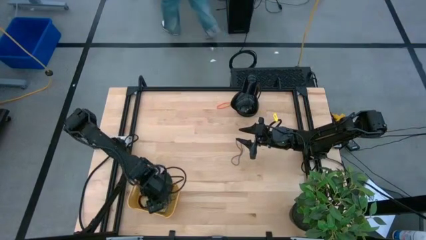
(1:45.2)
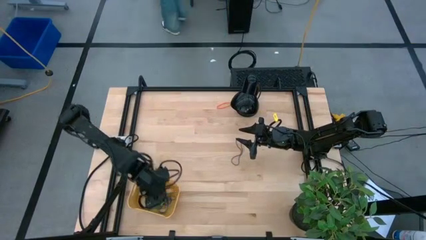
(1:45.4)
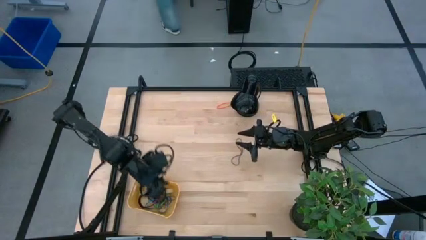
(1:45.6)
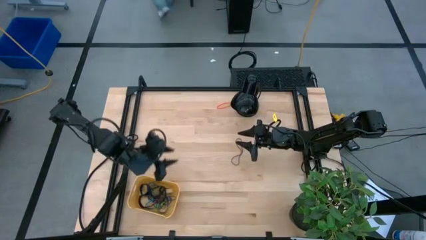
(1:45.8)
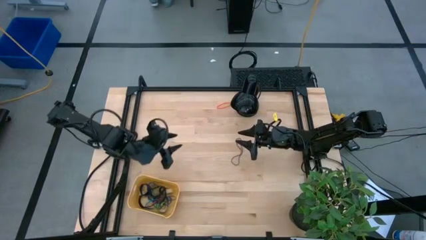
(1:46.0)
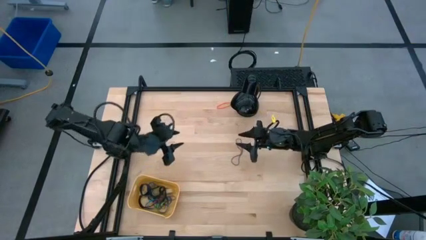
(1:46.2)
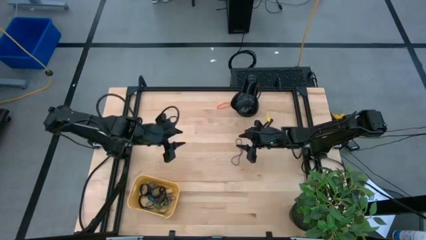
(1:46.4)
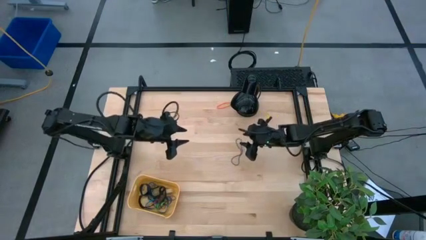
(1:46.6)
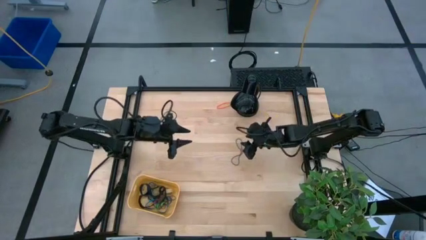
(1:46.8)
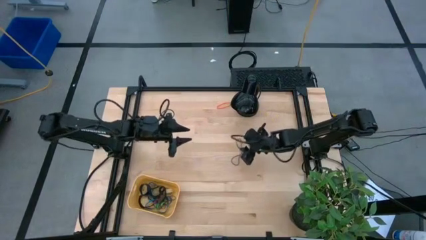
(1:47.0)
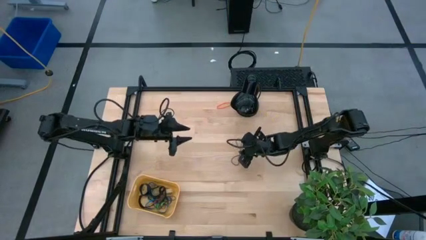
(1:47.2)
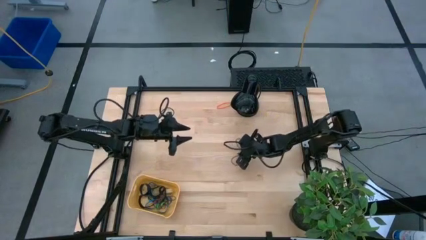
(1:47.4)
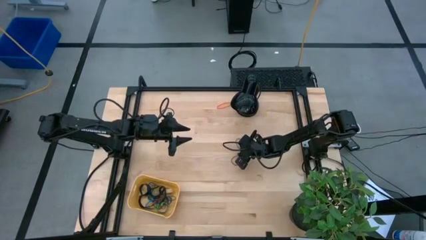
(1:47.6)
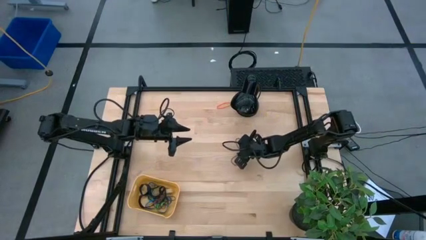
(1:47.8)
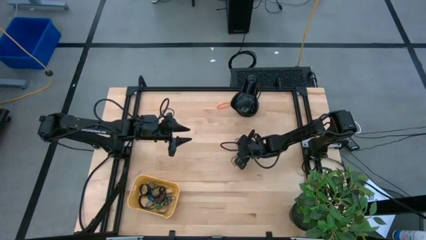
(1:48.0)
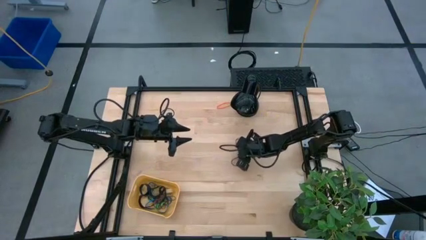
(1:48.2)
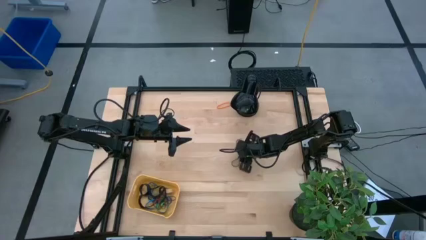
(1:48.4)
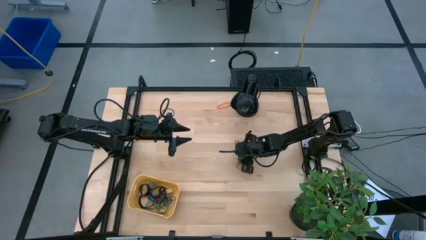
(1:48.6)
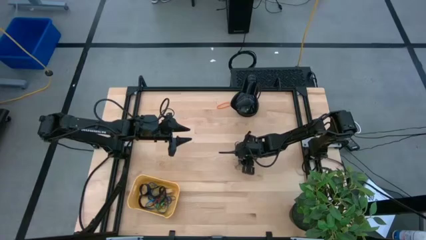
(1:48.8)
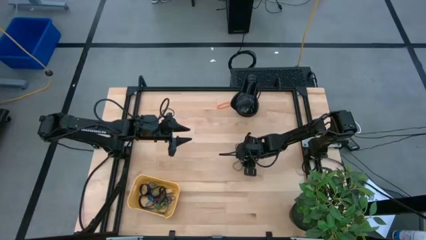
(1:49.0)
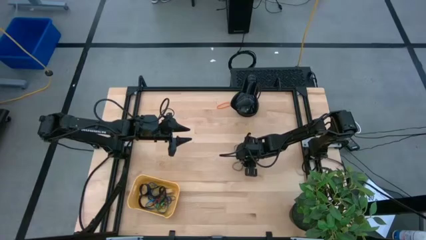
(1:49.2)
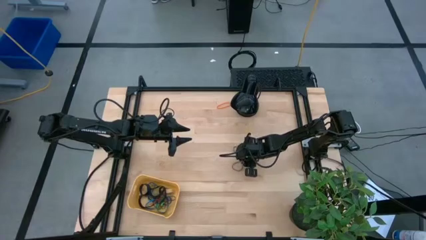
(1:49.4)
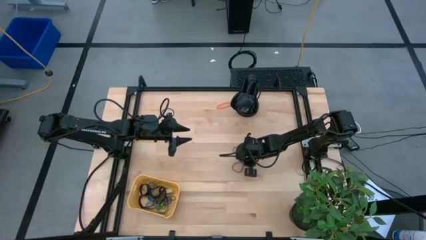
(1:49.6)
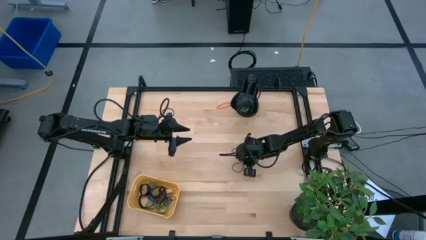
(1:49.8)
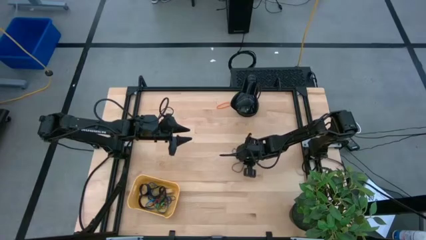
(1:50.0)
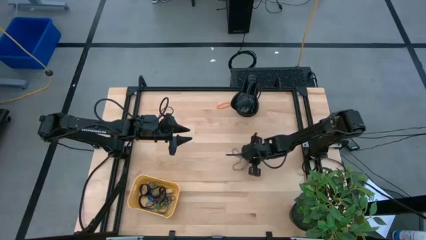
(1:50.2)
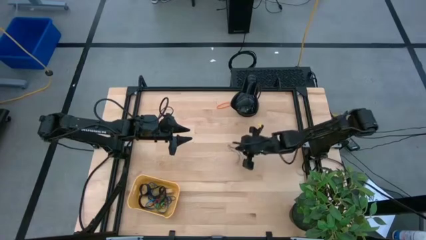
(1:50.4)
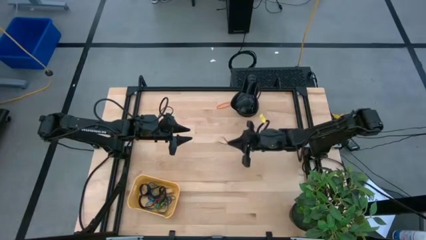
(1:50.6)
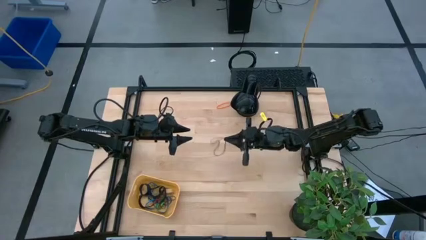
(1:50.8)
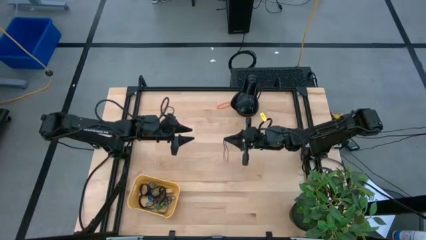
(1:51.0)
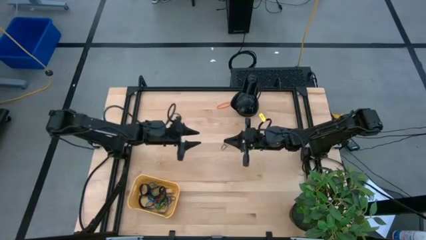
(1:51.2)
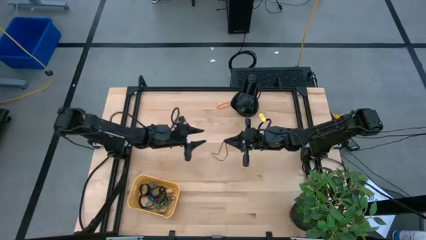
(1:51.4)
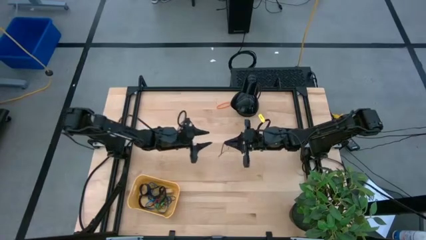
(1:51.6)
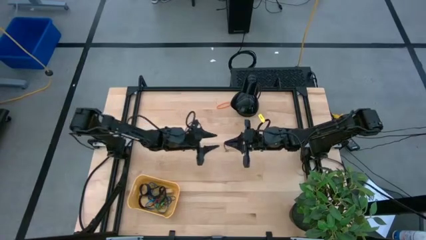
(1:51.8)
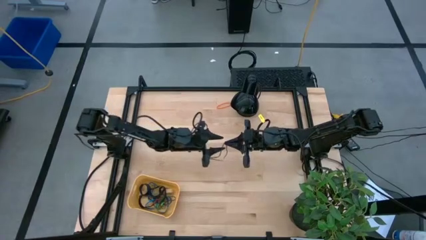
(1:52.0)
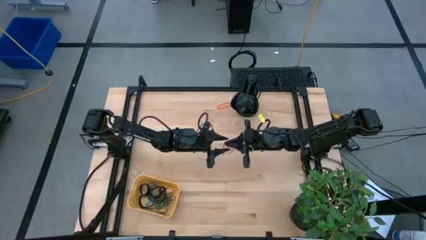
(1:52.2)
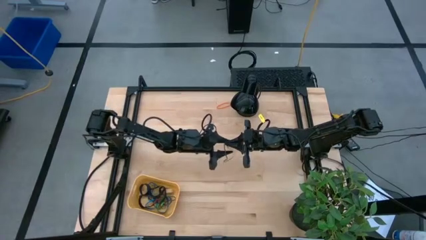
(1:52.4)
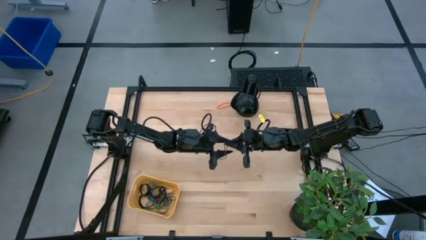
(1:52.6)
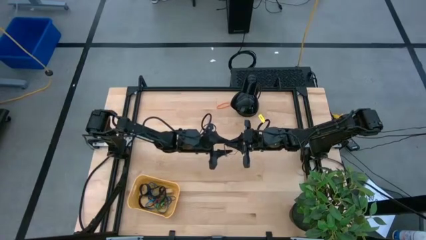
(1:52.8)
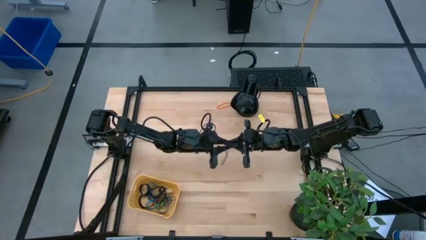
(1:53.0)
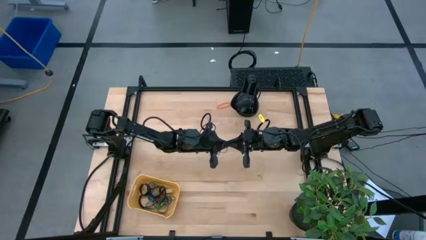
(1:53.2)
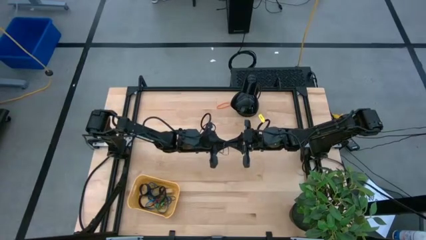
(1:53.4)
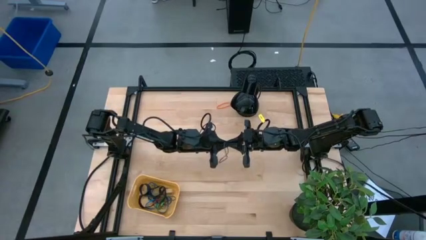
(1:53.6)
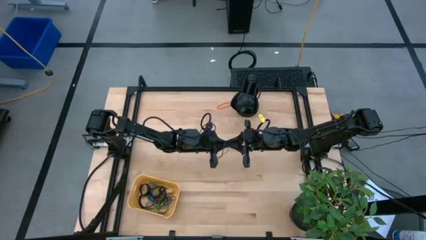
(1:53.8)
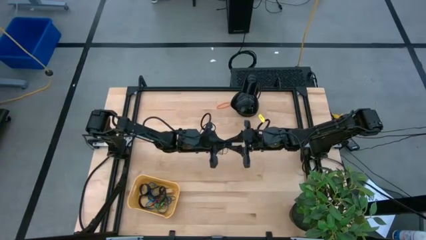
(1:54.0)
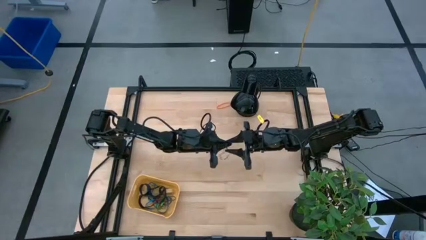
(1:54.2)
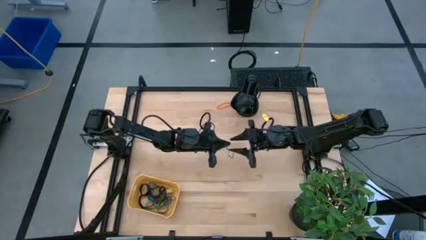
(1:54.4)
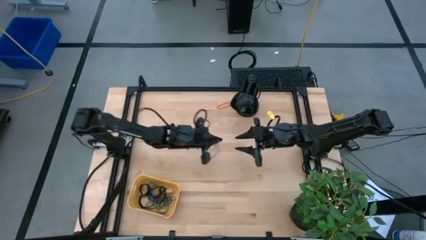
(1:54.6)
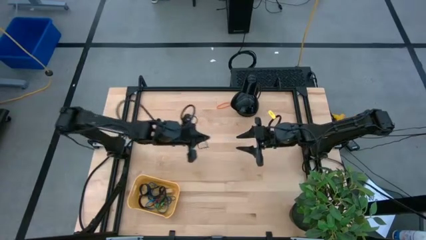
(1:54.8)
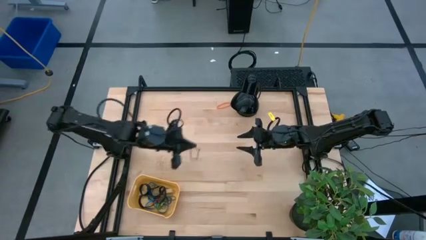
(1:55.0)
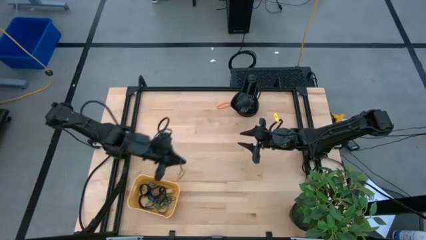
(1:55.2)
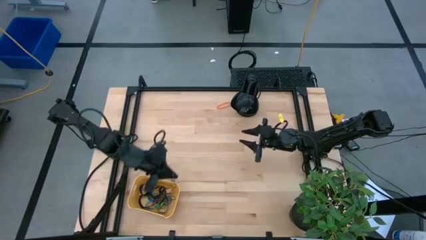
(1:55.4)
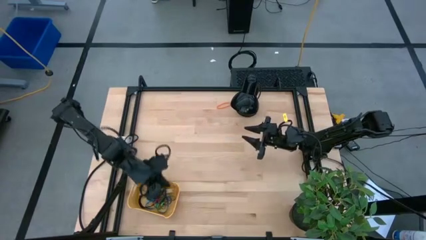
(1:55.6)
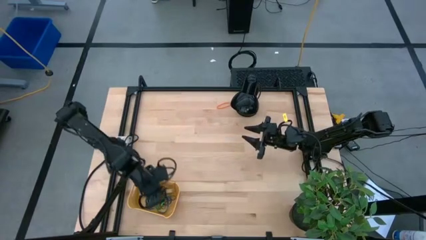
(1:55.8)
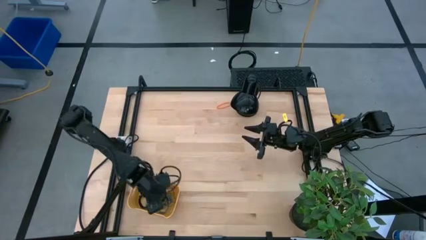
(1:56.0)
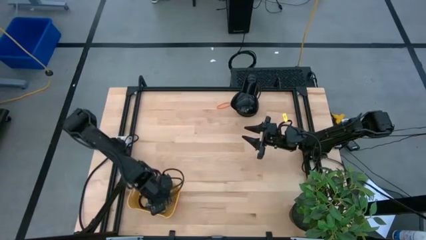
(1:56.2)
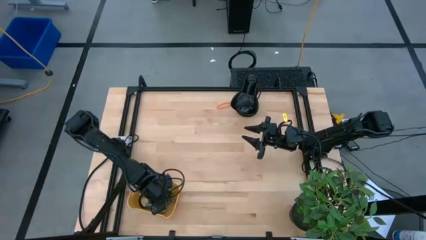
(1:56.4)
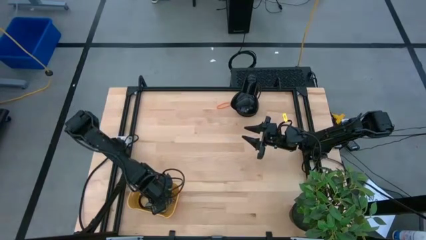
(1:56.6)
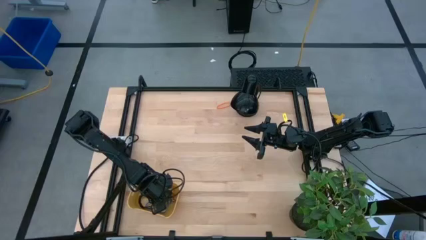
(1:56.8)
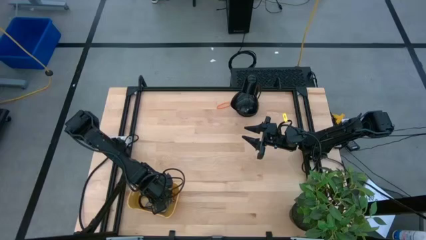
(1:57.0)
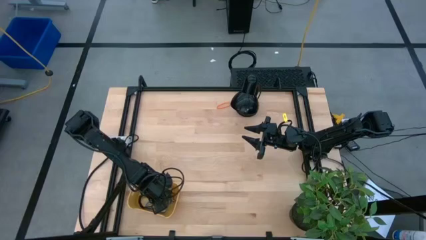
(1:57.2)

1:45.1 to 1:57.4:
Task: Pick and place rubber bands into bin
Put the purple rubberband into the yellow bin

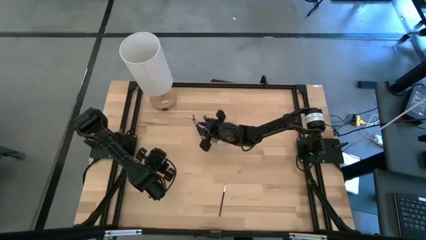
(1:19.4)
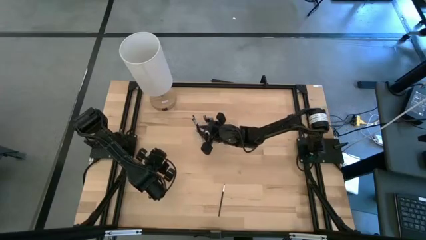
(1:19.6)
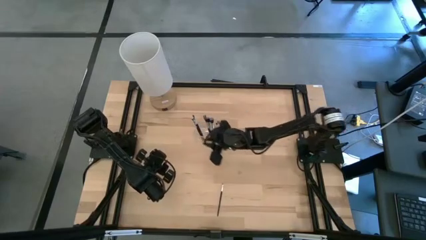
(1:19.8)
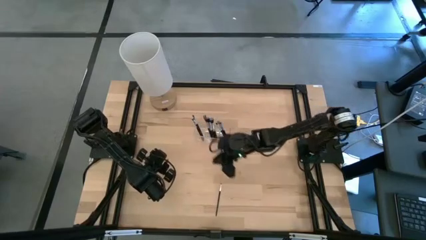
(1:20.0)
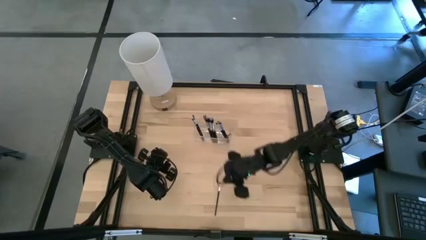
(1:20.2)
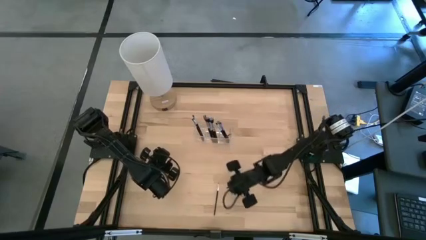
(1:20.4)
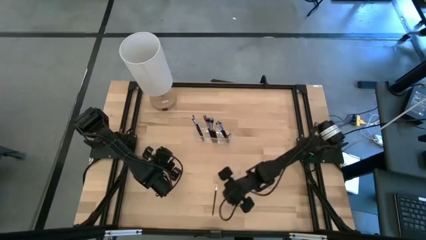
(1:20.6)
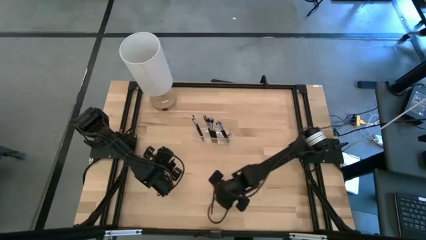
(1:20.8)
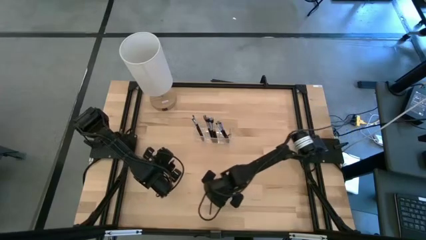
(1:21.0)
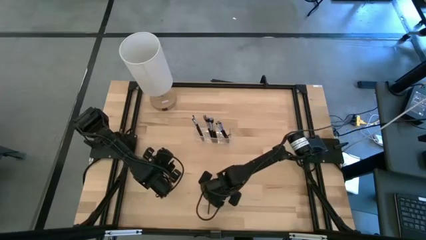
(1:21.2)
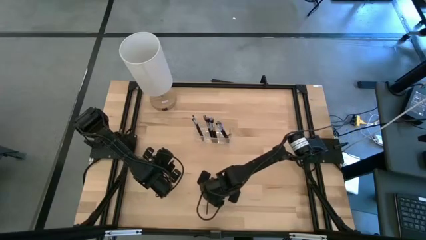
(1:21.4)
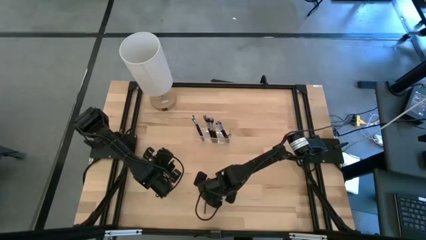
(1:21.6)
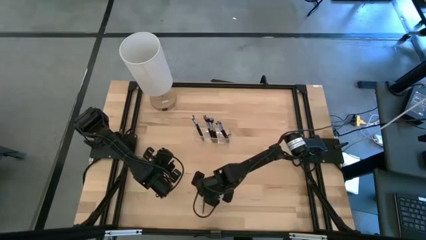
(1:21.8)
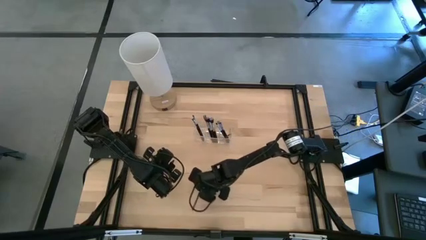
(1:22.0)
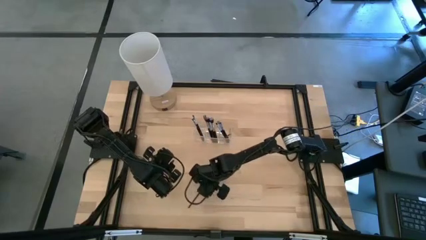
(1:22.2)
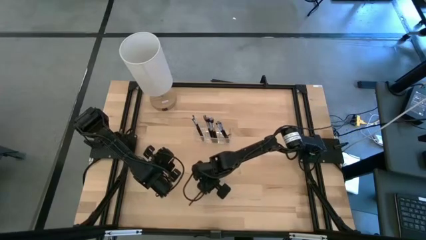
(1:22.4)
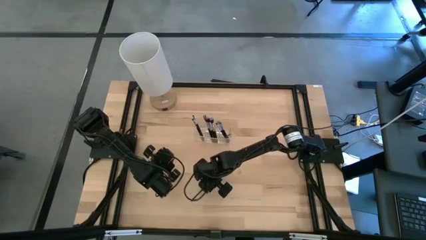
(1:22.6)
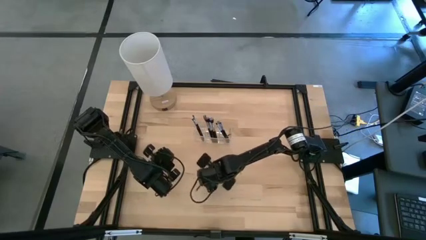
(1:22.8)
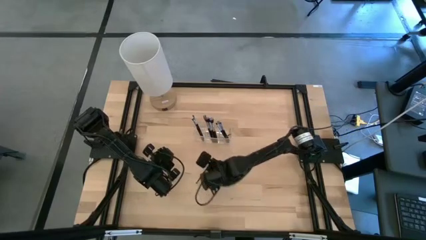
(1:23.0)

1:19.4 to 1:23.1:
Task: Put items in baskets/containers
Put the black eyeshadow brush into the transparent organizer

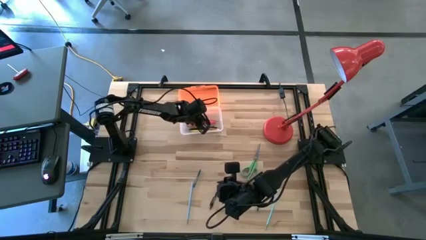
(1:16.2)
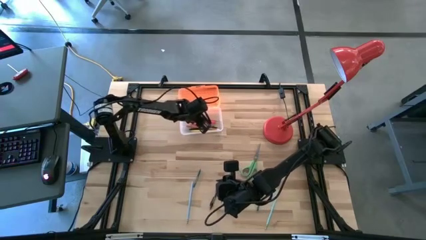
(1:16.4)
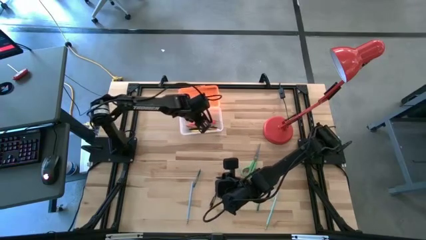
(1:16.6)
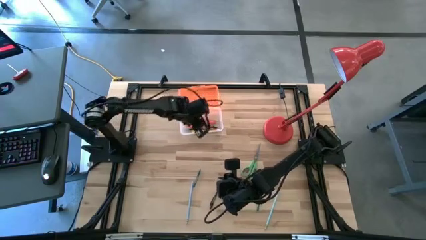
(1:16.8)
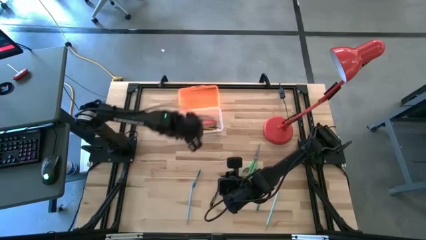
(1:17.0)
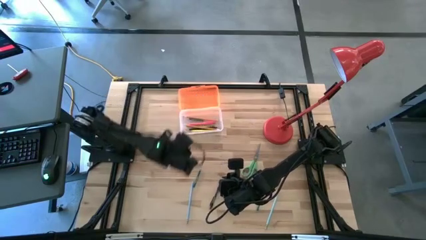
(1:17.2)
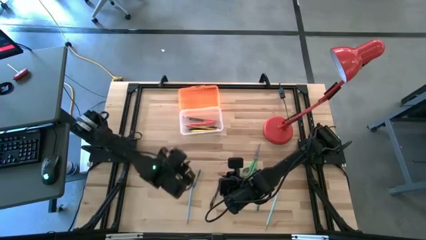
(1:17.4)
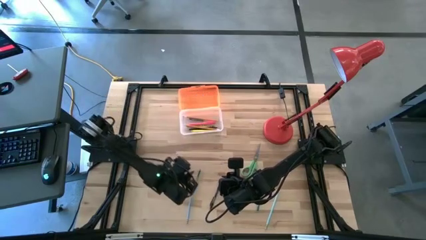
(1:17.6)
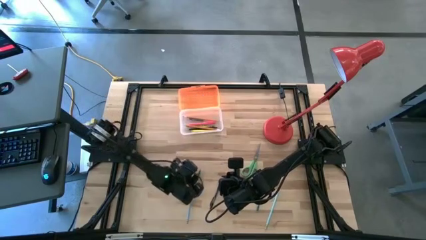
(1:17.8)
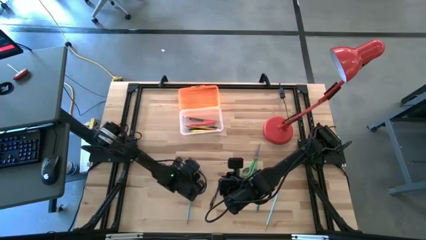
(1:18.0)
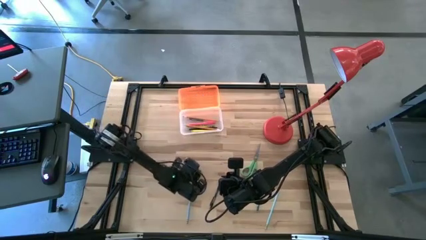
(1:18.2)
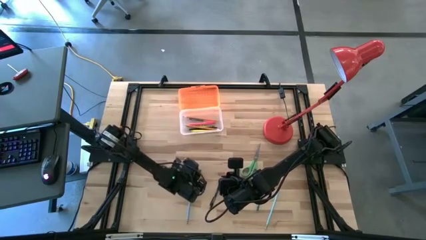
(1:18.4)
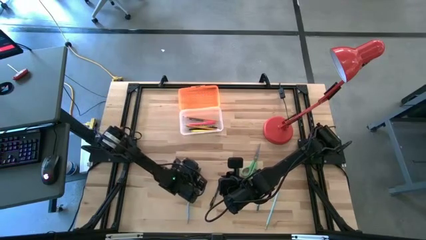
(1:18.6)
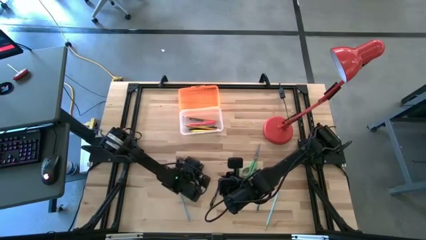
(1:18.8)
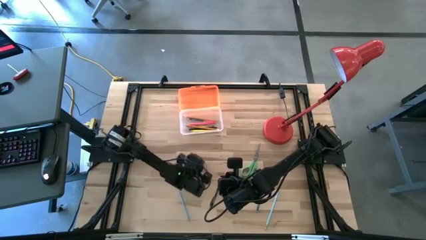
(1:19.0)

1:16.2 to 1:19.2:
Task: Pick & place school supplies into a supply box
Put the top dark green crayon into the orange supply box
